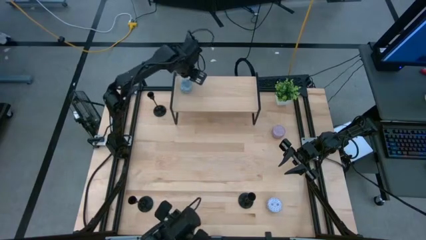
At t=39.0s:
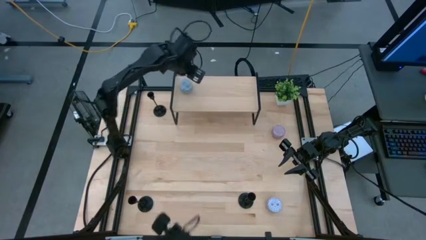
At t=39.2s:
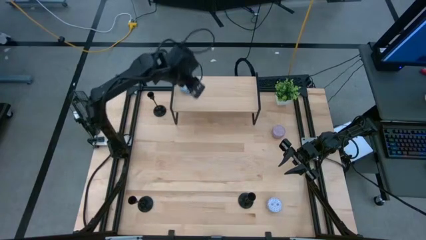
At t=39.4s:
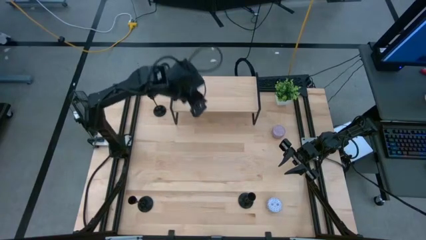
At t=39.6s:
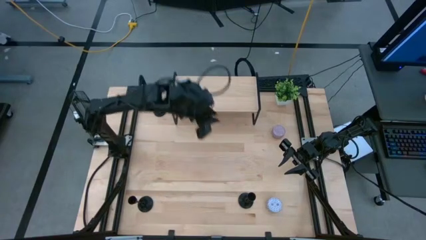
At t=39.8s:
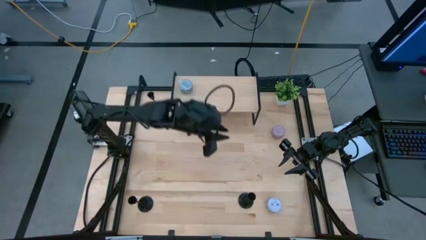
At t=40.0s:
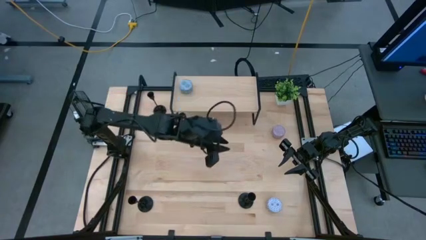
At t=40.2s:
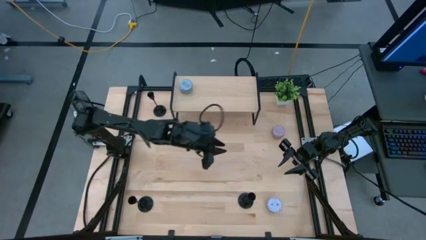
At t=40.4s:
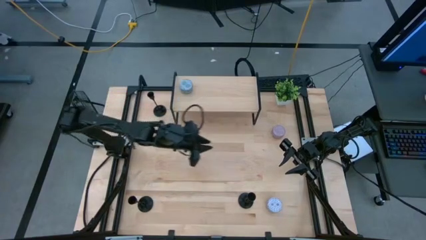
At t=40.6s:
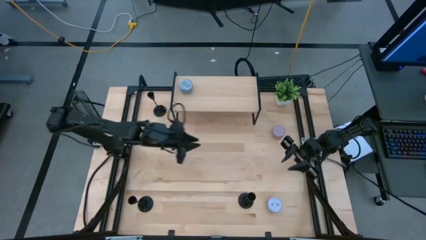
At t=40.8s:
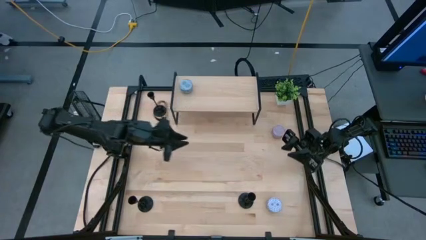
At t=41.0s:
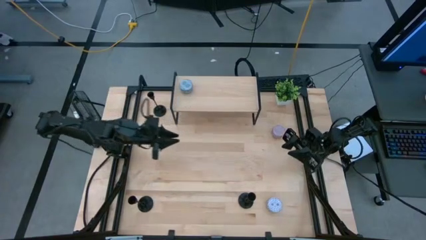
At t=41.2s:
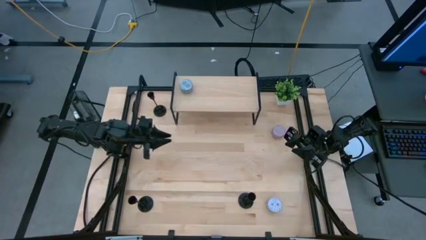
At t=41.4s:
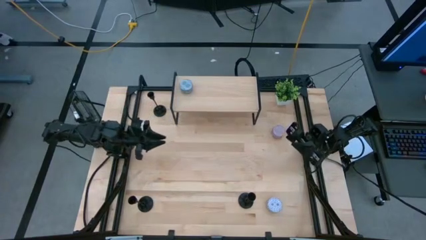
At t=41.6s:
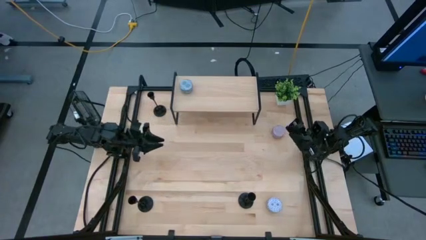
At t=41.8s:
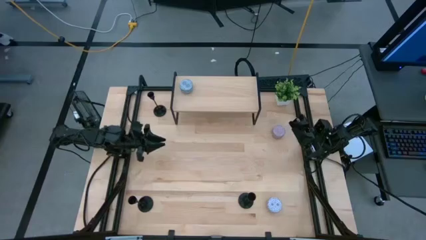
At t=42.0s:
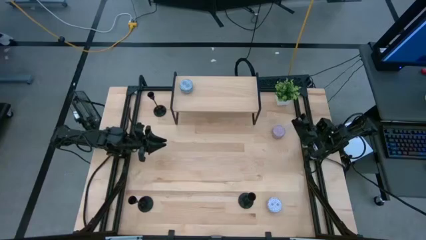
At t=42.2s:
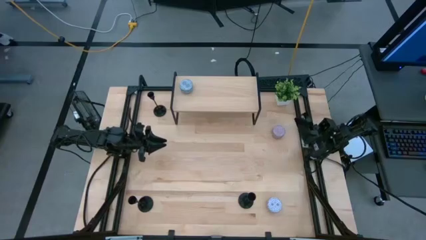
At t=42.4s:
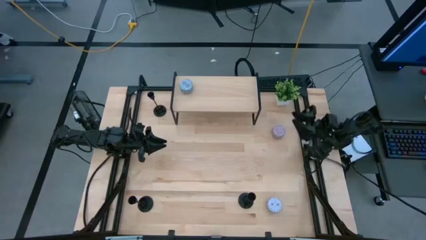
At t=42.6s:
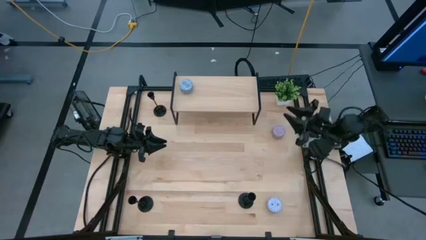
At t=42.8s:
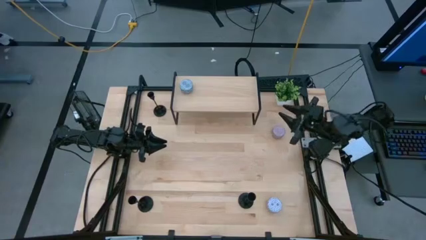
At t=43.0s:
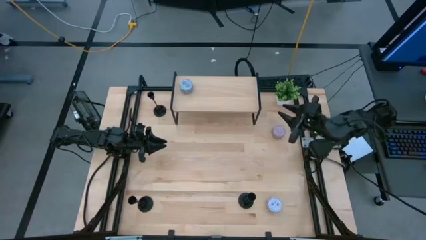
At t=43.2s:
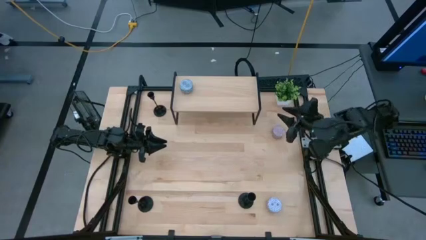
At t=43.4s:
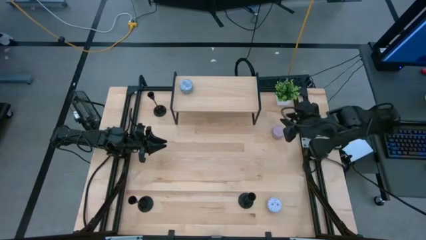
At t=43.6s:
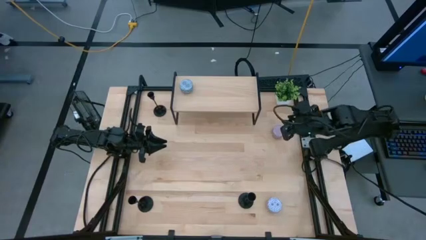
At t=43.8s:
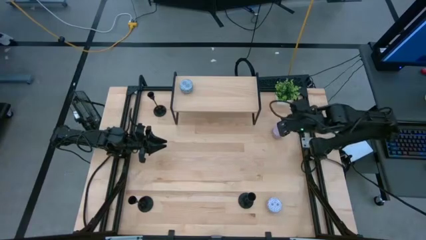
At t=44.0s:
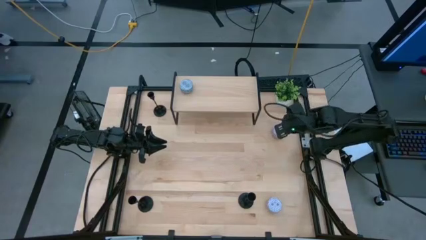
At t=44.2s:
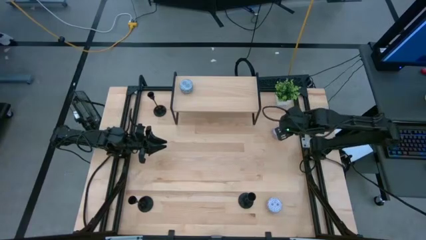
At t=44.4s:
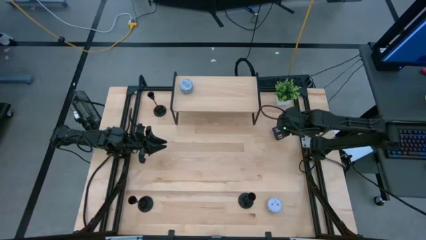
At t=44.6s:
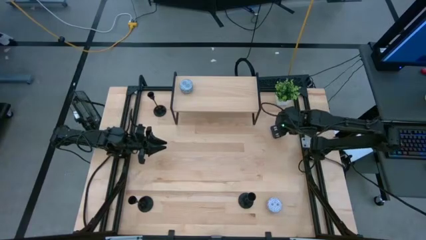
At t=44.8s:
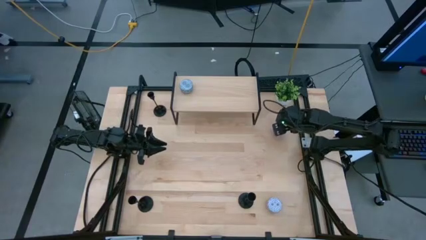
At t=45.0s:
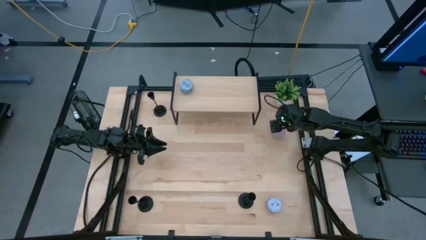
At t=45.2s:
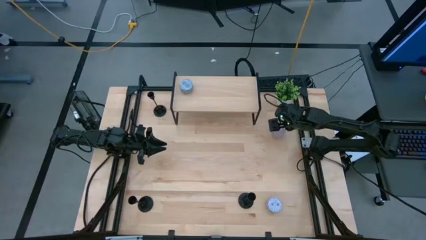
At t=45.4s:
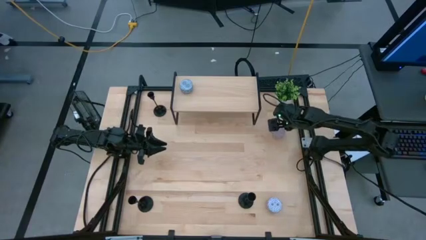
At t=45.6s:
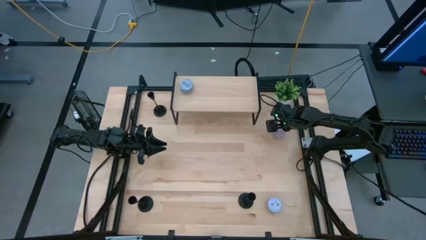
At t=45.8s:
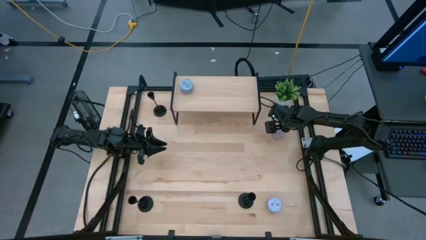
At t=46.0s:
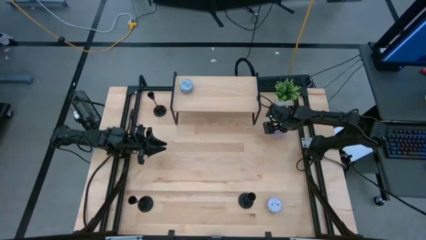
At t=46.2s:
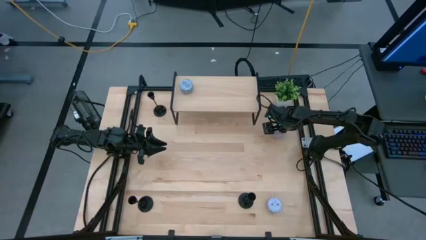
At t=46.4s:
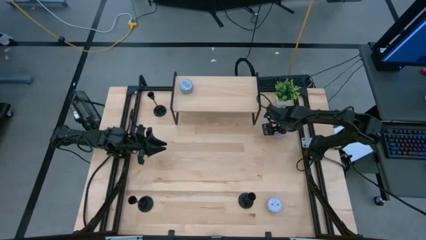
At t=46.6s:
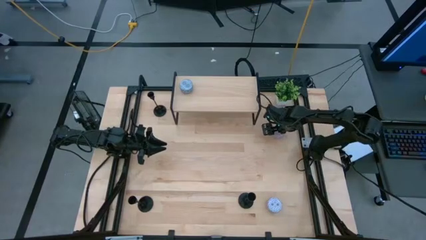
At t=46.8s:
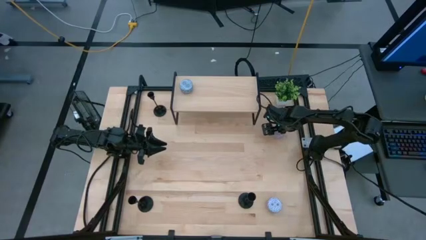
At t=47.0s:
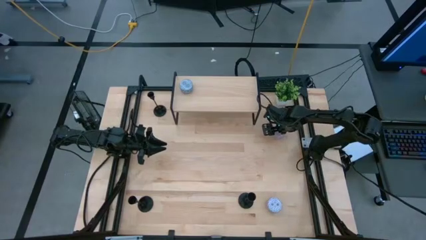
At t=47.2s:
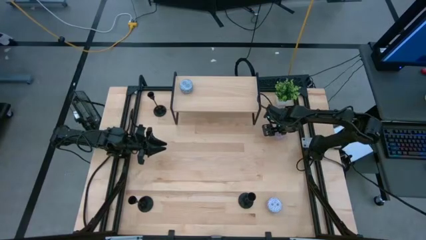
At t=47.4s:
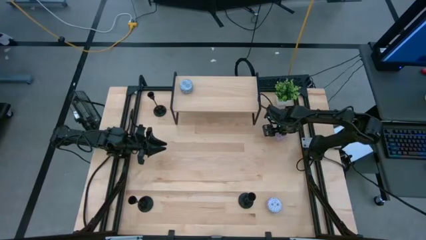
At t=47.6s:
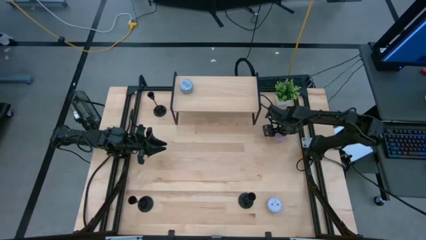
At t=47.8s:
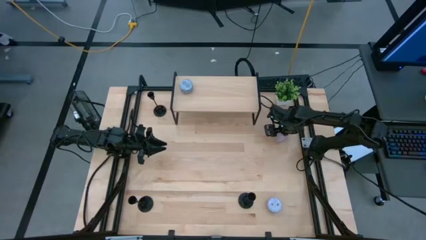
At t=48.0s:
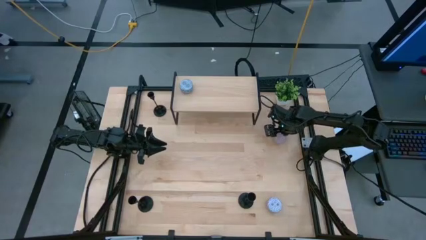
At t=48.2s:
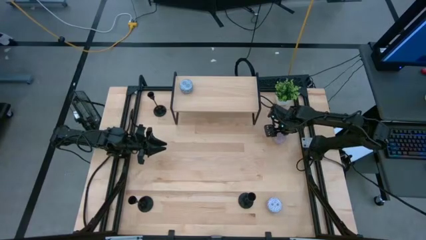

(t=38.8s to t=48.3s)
Task: Pick & Place candle stick holders
Put the purple patterned scented candle on the shelf
